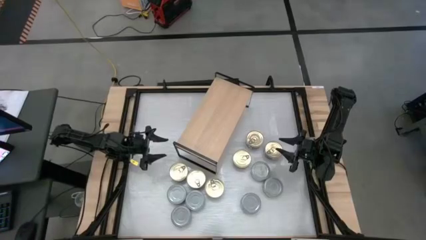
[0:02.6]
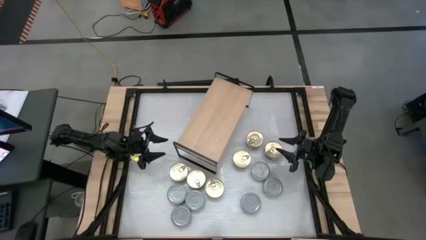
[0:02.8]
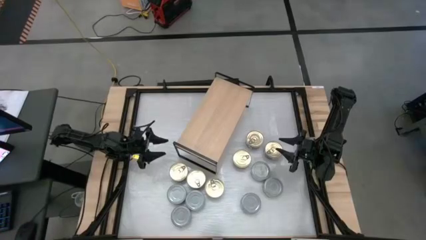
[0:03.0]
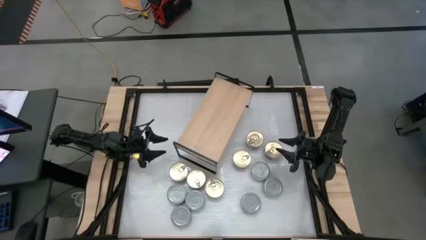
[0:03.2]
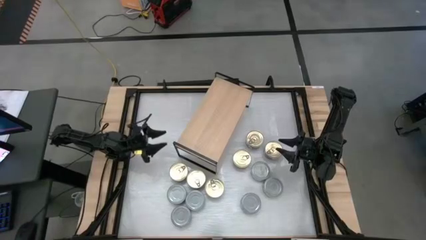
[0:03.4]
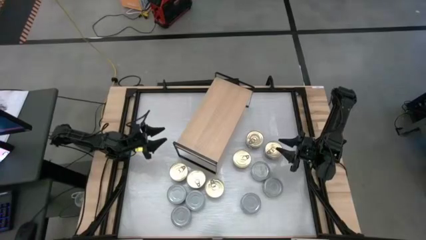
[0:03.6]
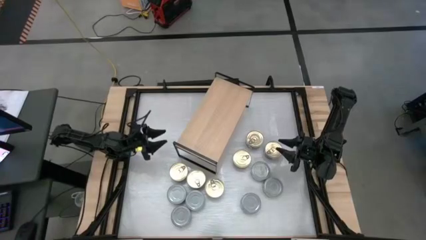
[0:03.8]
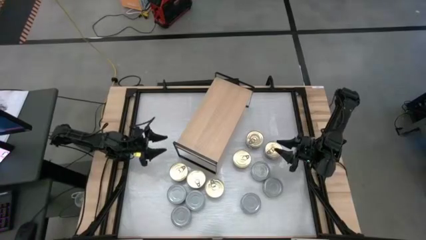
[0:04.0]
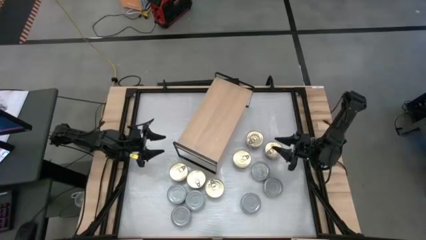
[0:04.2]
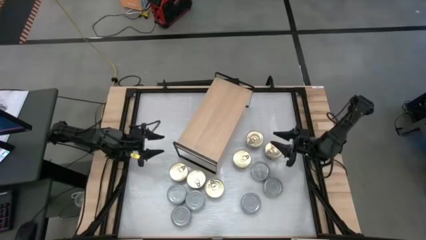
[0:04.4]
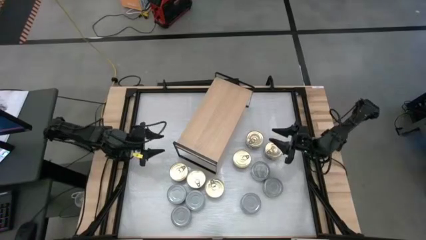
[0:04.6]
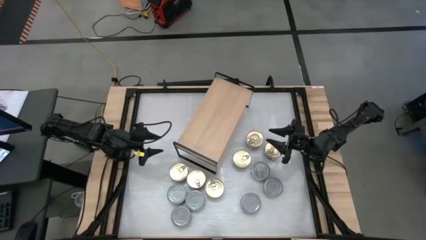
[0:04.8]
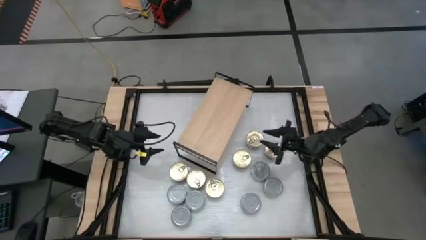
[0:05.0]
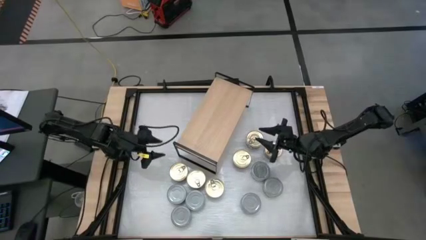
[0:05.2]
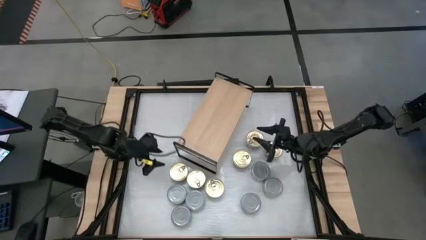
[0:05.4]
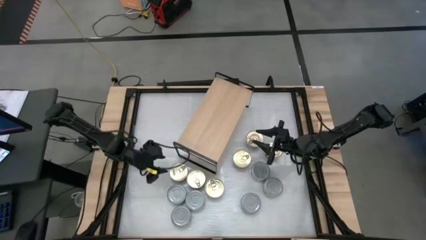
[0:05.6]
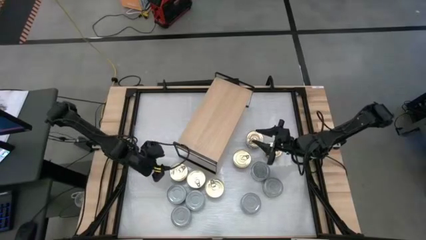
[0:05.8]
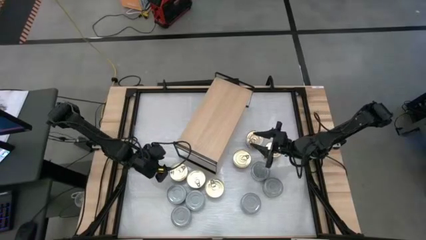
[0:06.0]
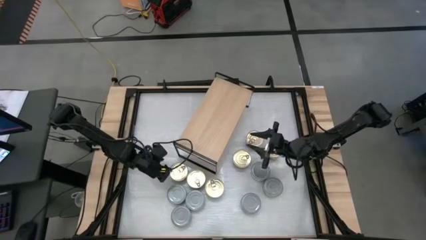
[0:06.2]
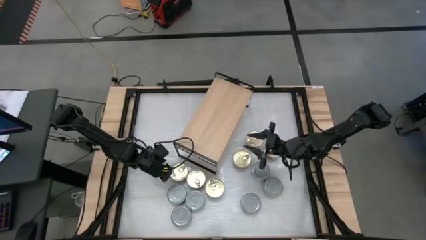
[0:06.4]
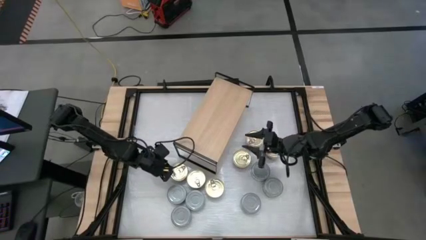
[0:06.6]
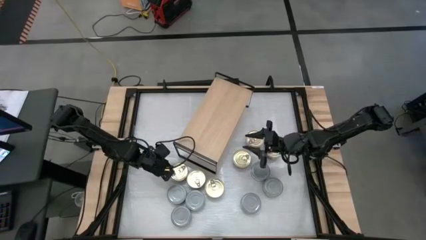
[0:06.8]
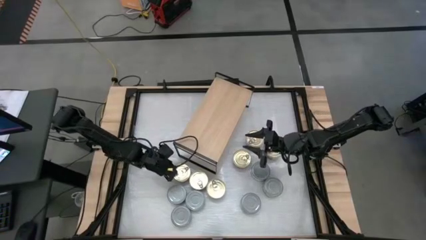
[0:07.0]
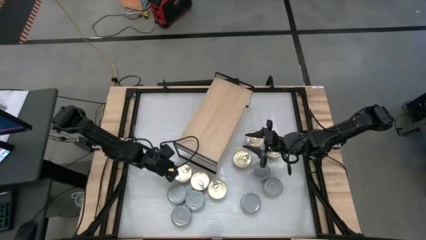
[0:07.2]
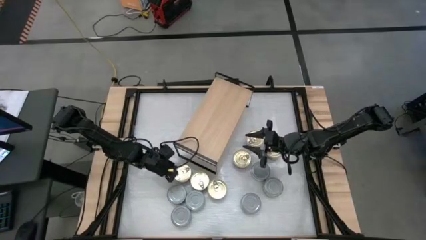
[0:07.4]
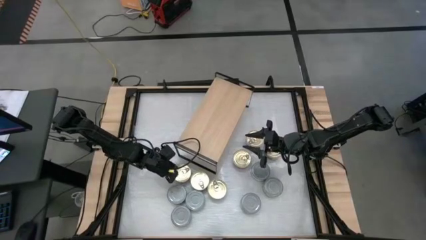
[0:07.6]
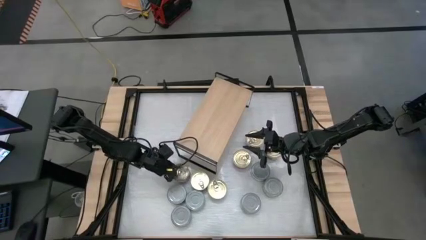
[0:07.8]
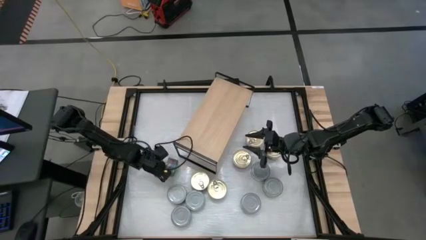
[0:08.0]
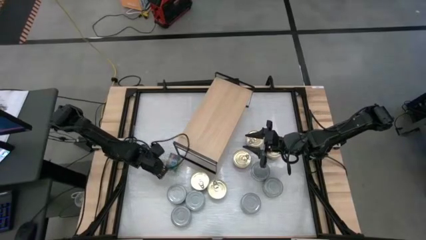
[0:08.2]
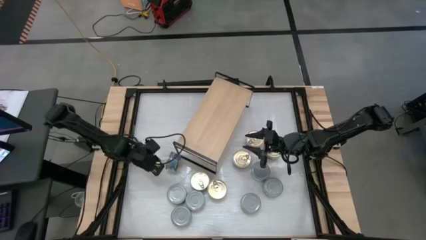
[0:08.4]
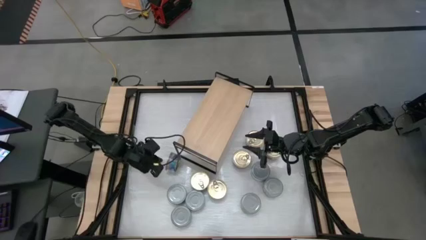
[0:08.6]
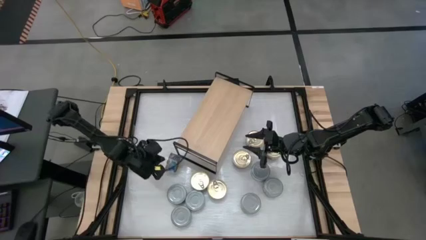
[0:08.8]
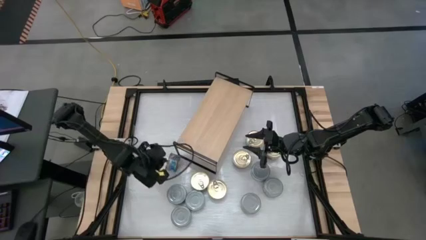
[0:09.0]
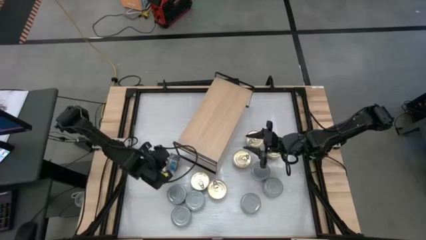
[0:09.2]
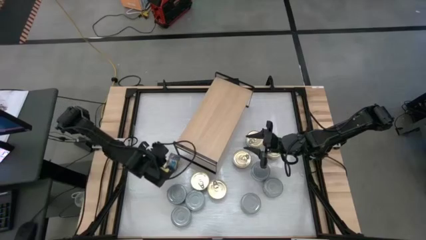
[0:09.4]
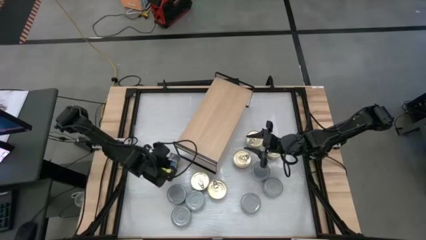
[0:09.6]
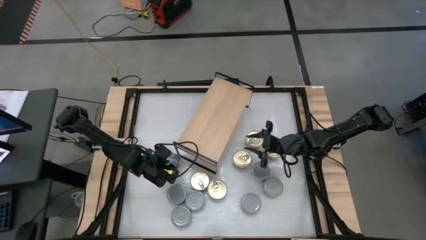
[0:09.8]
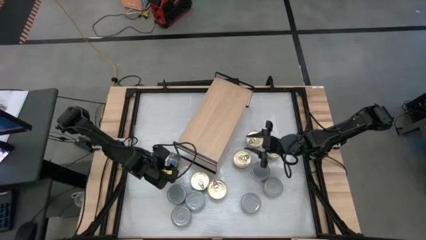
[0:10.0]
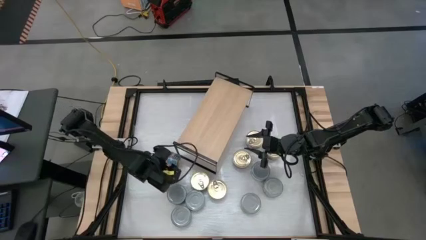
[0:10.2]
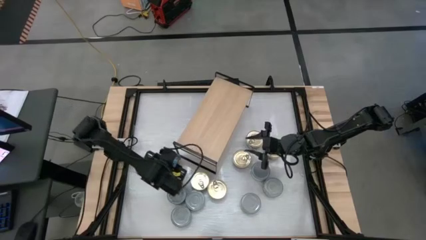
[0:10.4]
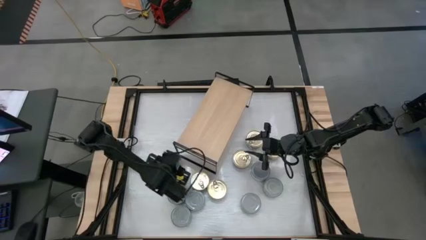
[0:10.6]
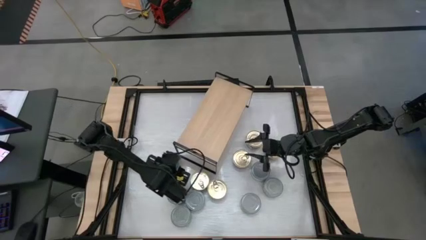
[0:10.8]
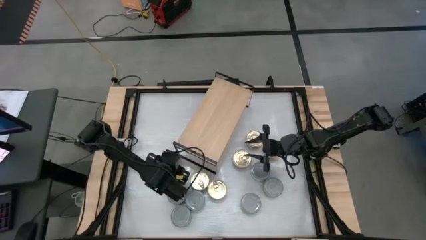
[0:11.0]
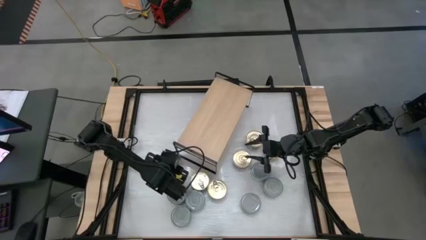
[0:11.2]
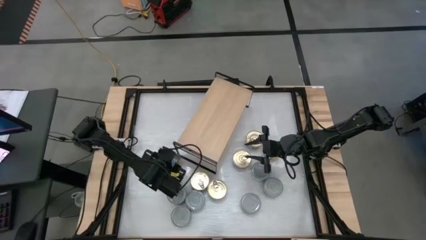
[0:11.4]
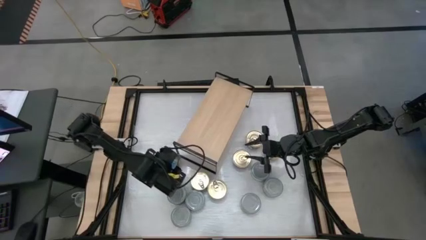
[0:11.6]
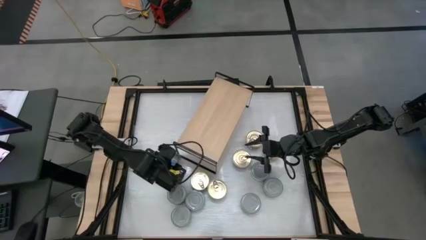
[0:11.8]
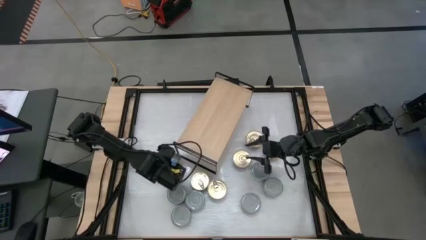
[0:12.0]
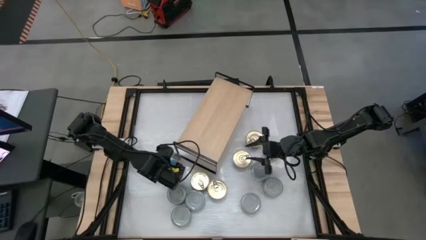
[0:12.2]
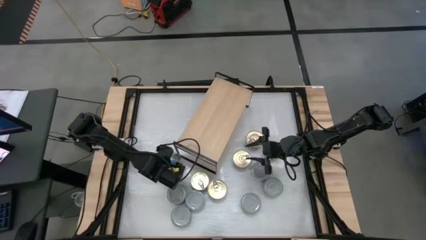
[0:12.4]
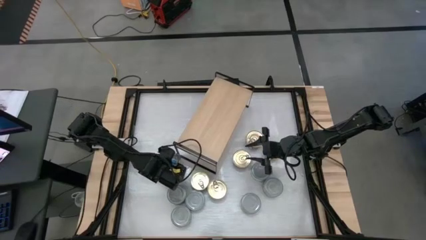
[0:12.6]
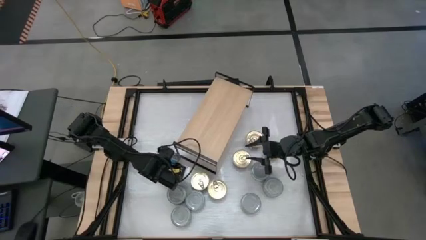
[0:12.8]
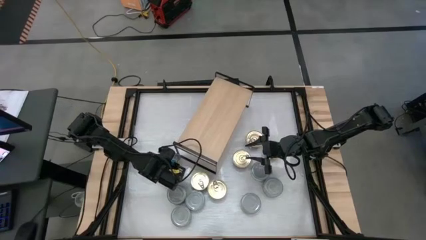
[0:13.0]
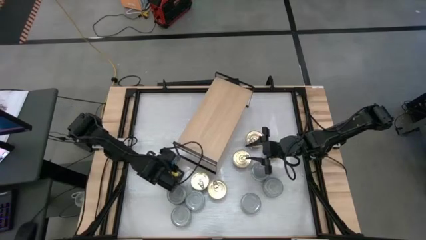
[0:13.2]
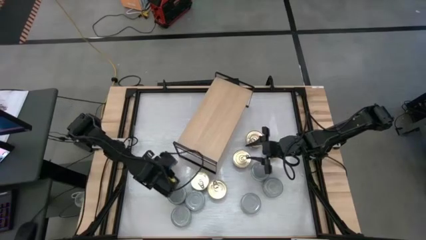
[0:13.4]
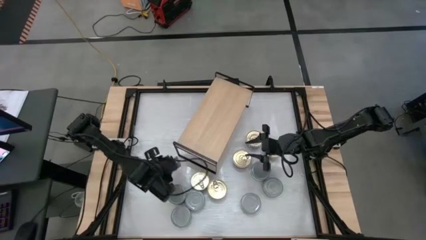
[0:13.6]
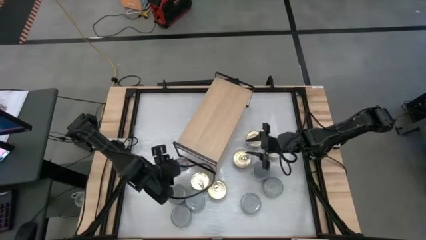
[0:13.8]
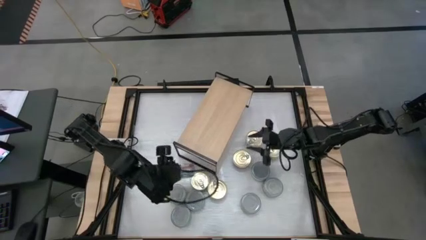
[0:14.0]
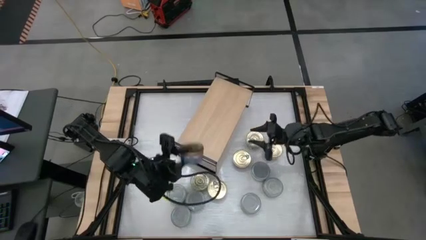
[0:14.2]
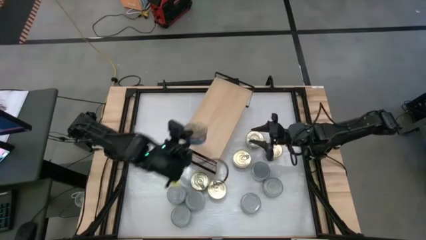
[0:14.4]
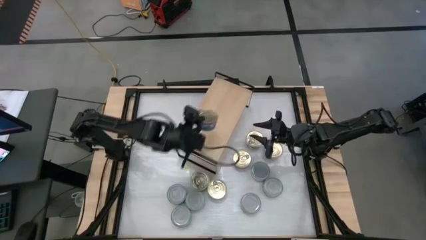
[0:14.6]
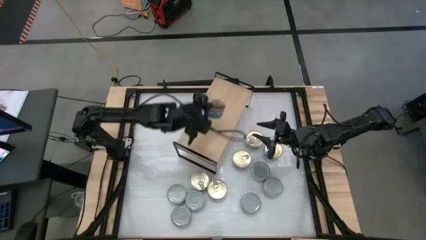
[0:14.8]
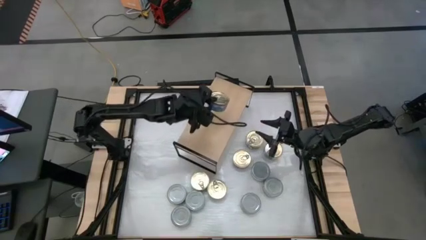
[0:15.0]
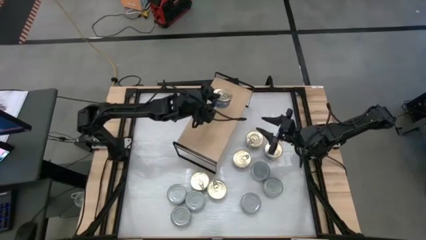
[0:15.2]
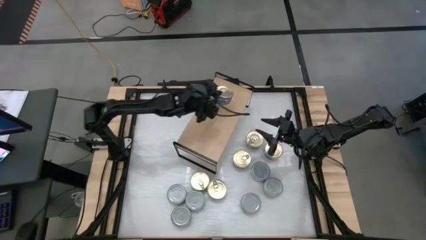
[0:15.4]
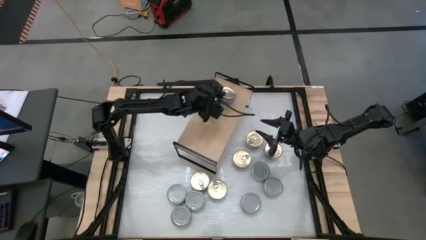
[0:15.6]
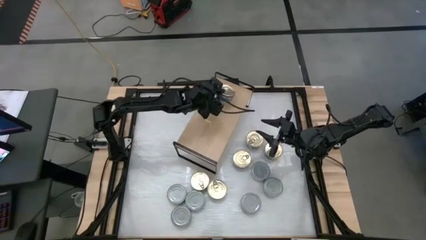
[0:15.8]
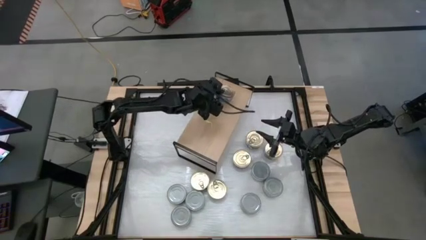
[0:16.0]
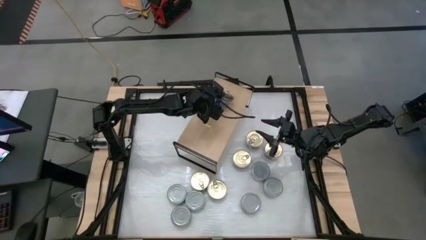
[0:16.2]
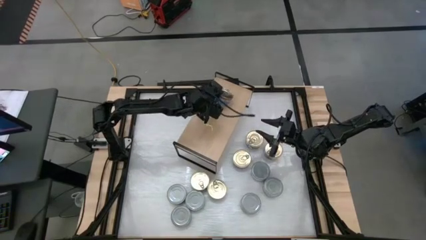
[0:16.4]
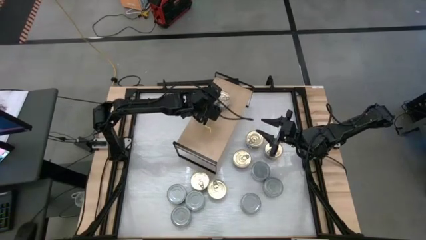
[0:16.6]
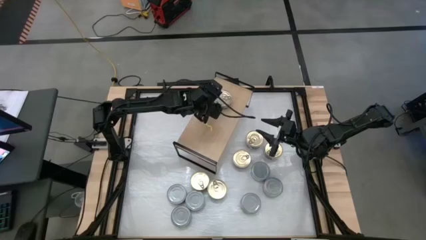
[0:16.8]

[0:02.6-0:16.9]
Task: Stack canned seafood by type on shelf
Put the blue tuna can on the shelf
